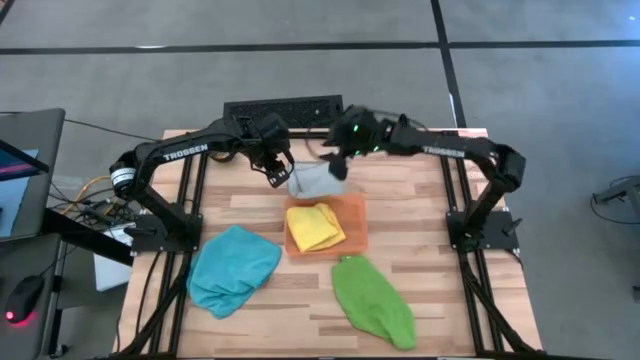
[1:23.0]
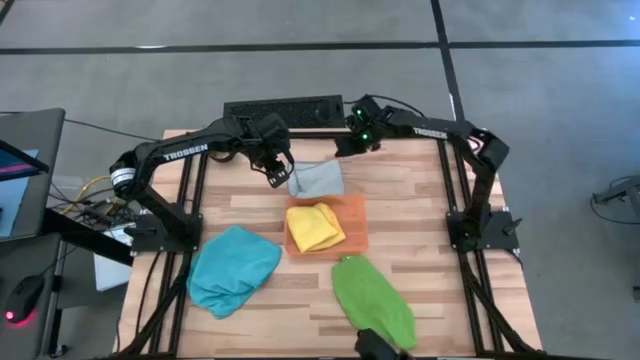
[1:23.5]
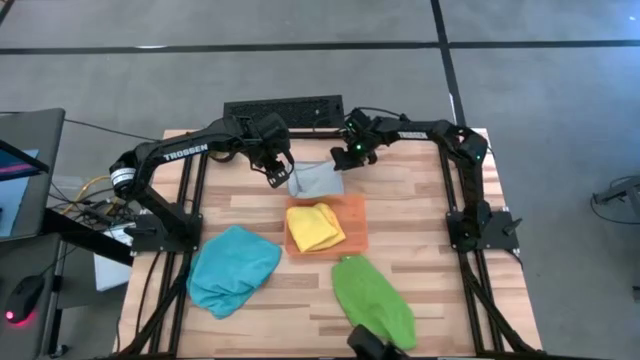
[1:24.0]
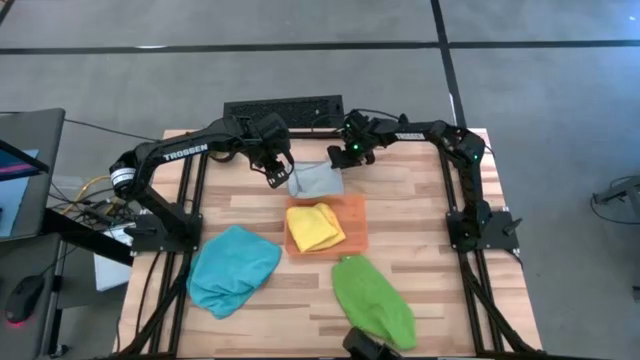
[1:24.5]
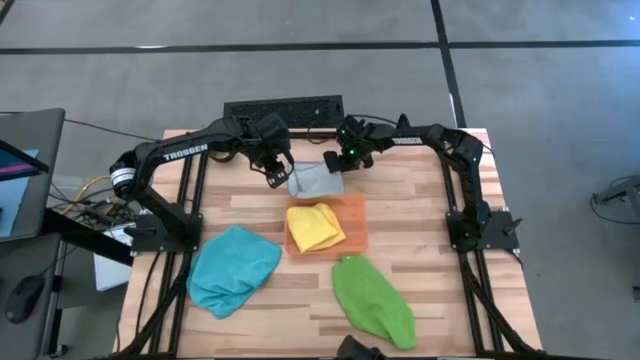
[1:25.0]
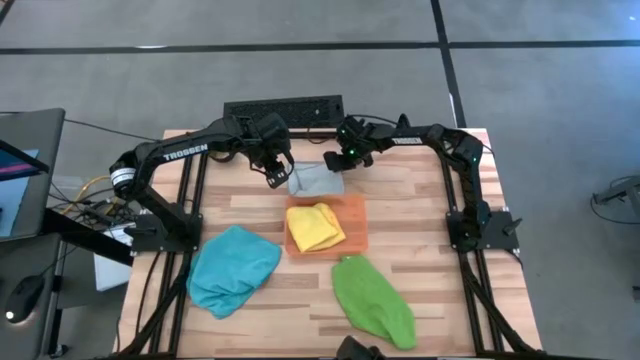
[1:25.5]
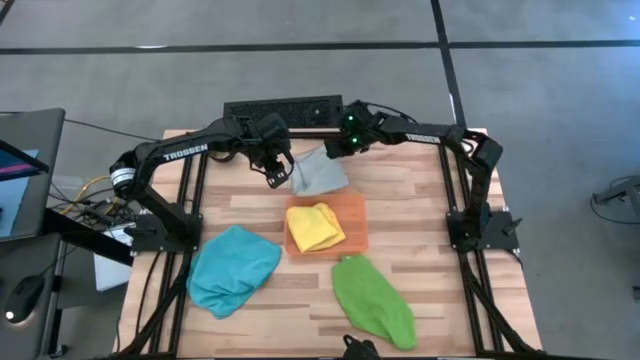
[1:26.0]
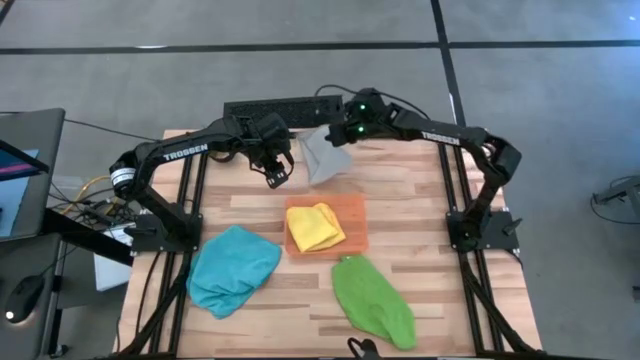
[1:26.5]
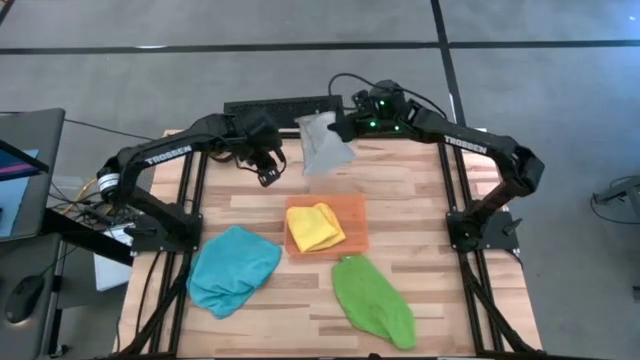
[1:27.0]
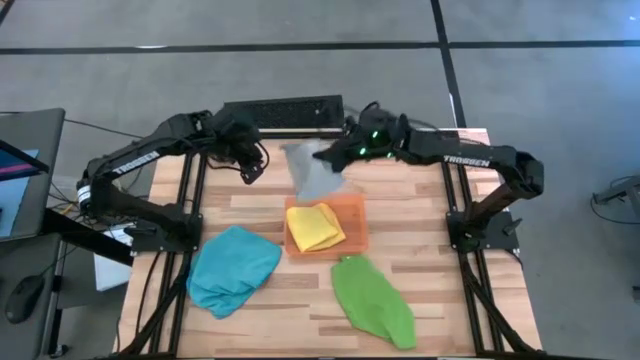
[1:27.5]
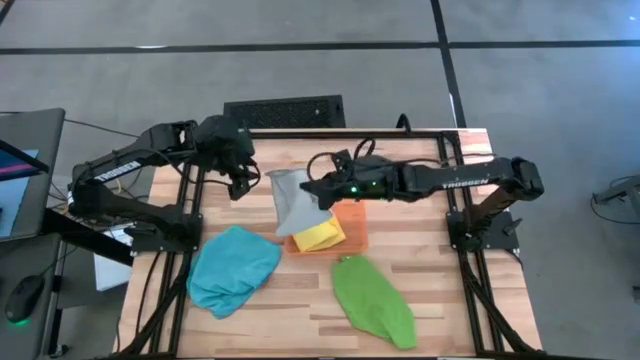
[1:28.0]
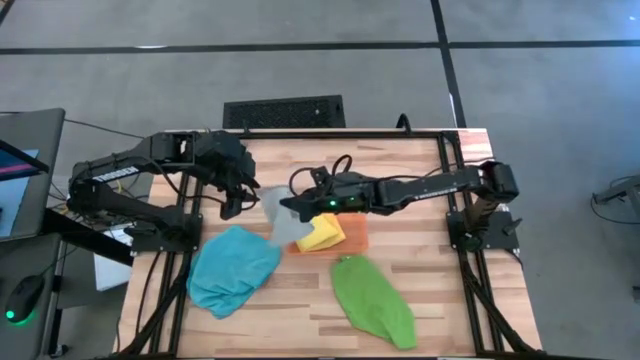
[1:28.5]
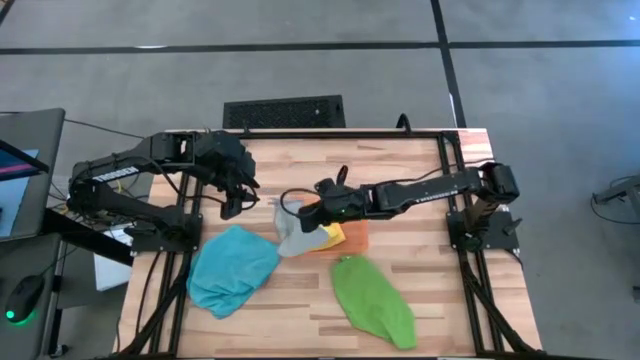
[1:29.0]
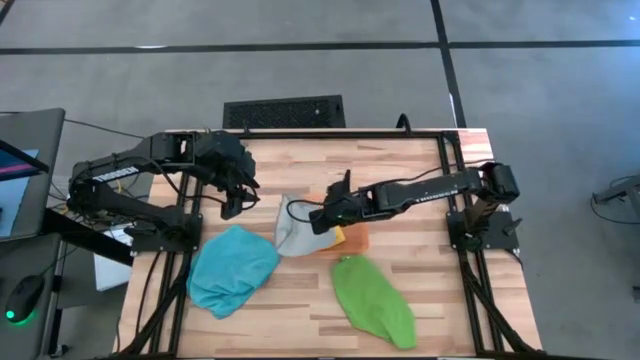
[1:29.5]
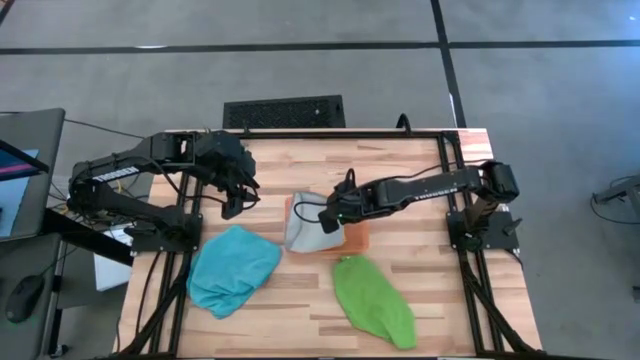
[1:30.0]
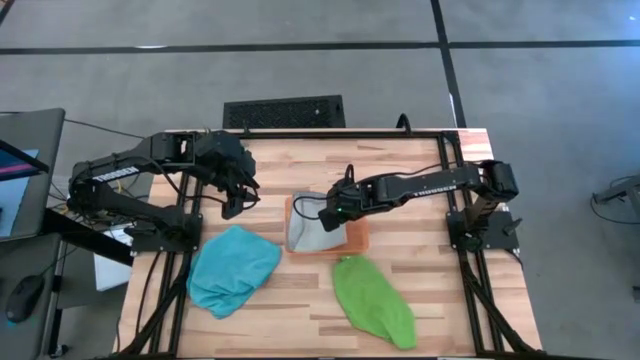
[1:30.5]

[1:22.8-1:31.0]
Task: Sort microfiber towel by color & place in baskets
Stack the gray towel on top of the yellow towel into the orange bin

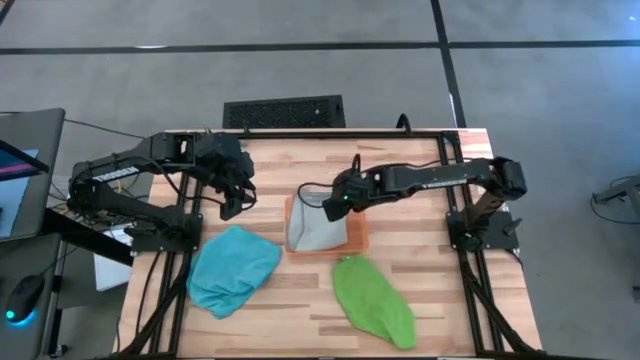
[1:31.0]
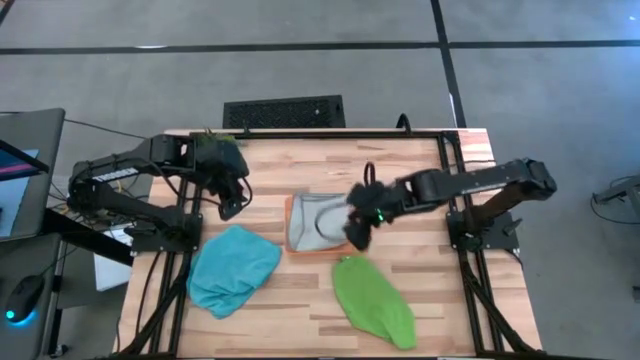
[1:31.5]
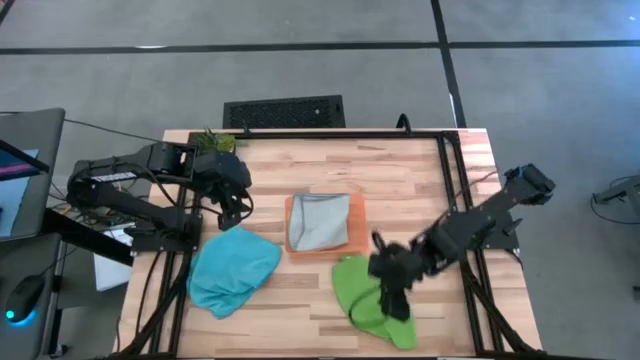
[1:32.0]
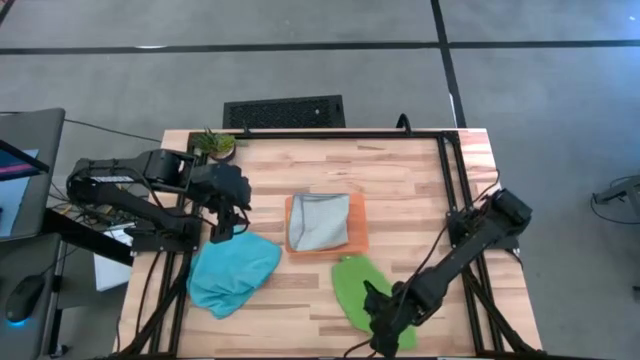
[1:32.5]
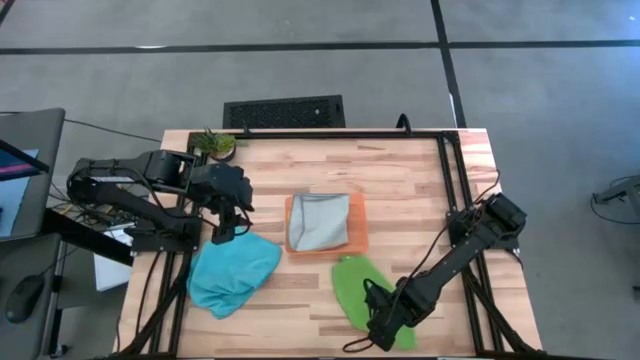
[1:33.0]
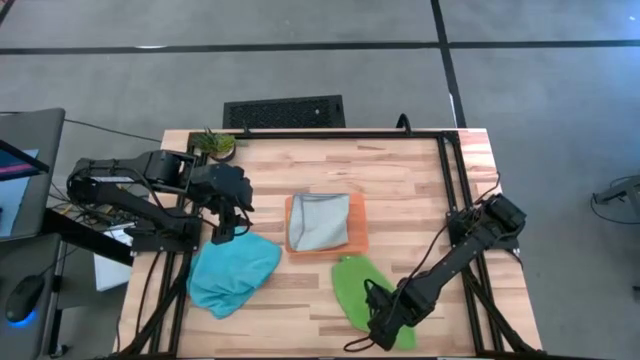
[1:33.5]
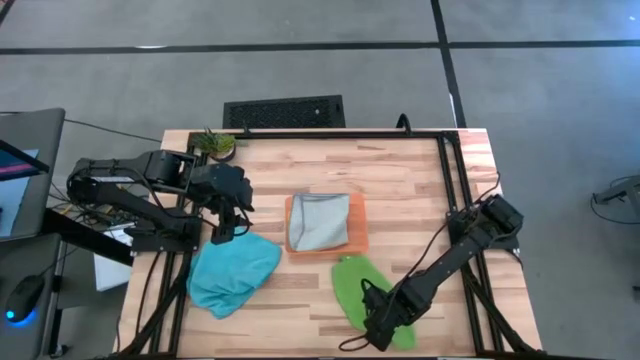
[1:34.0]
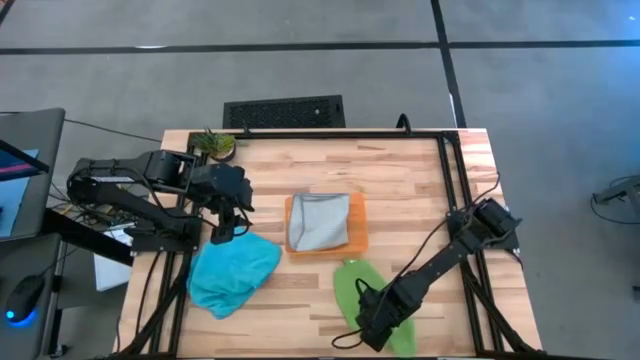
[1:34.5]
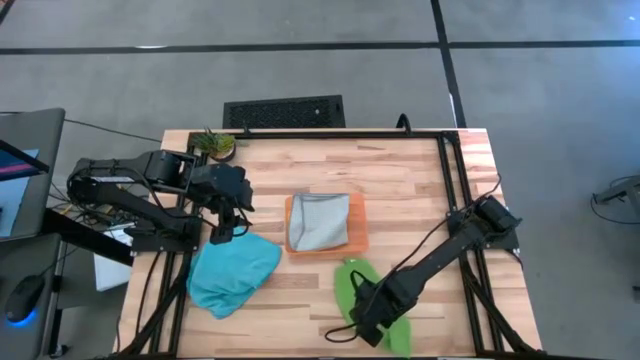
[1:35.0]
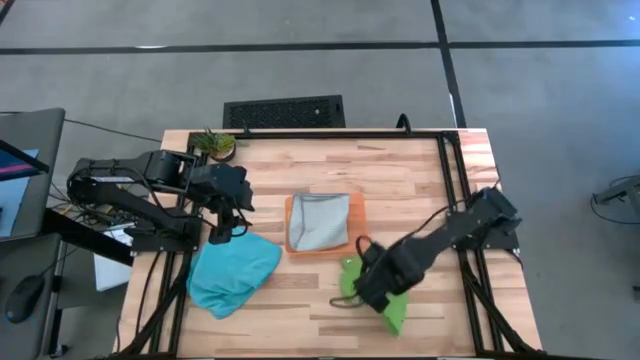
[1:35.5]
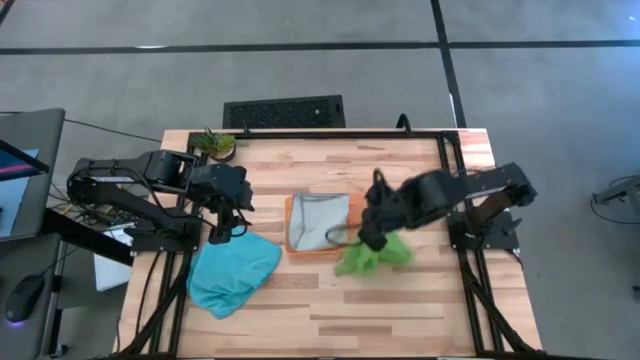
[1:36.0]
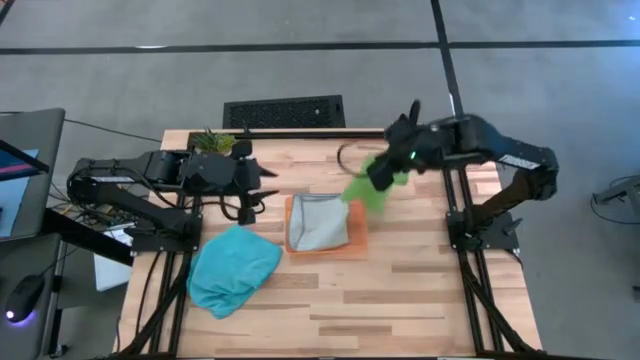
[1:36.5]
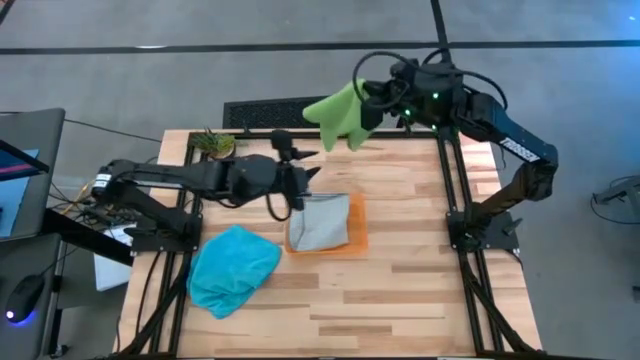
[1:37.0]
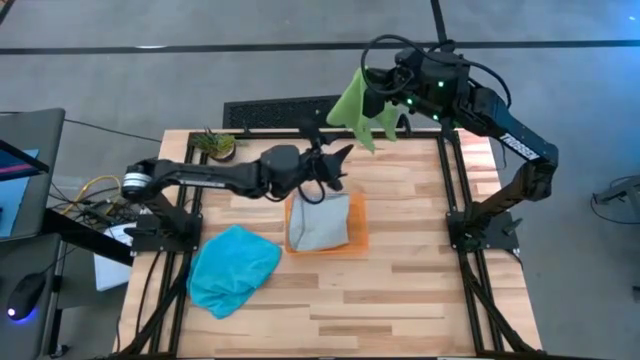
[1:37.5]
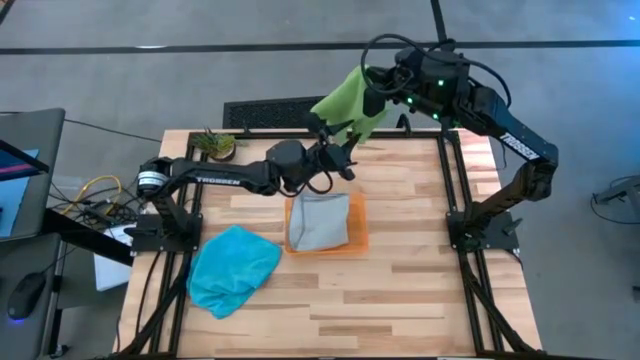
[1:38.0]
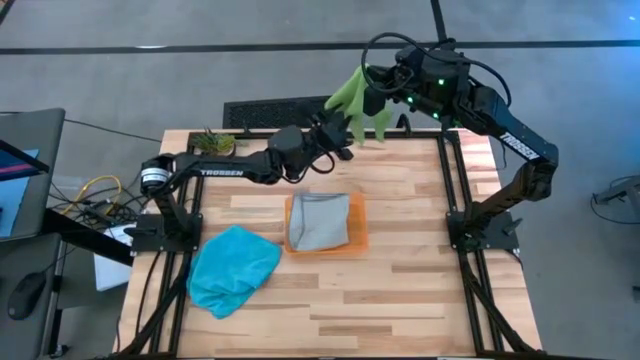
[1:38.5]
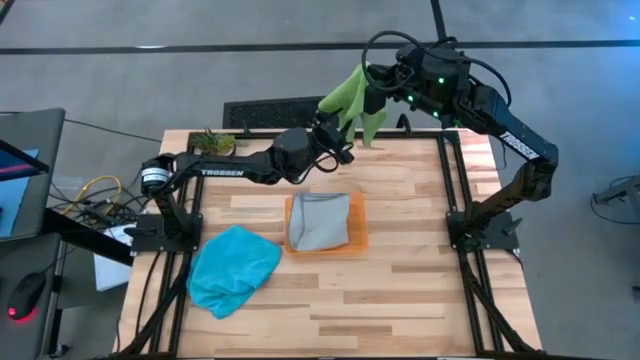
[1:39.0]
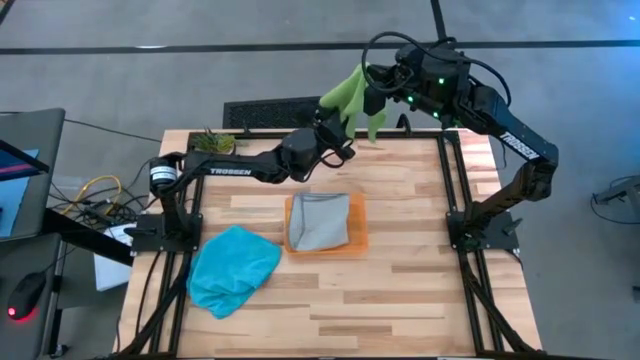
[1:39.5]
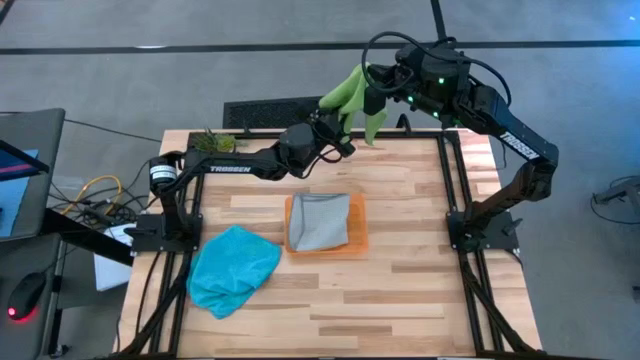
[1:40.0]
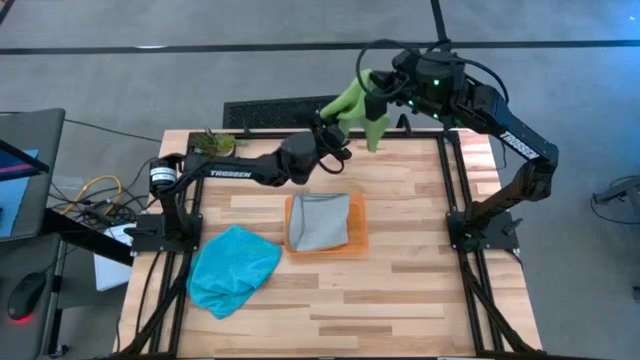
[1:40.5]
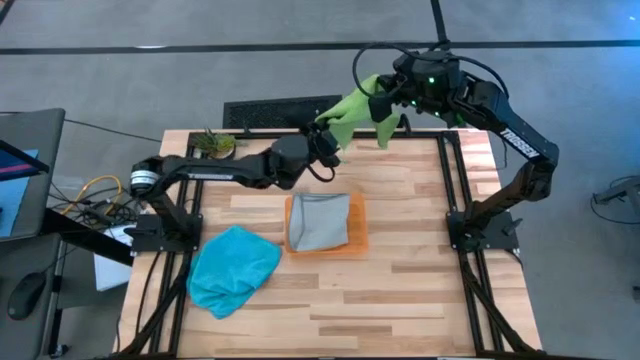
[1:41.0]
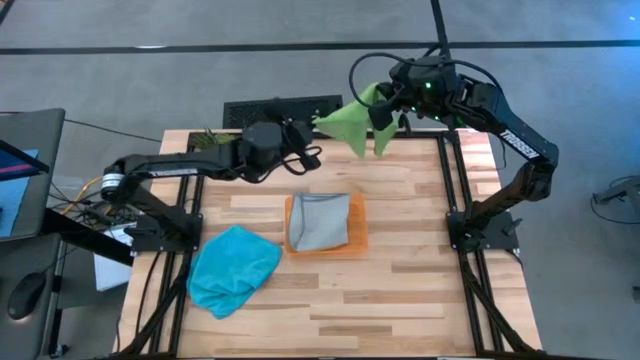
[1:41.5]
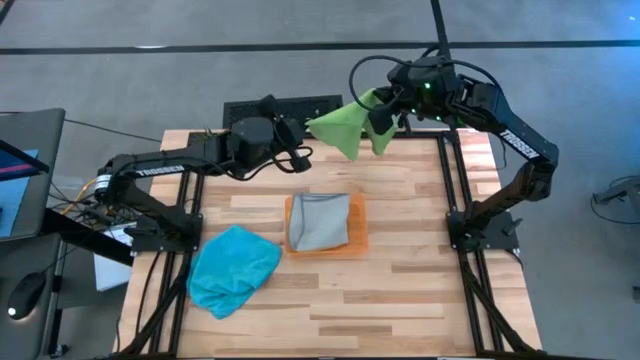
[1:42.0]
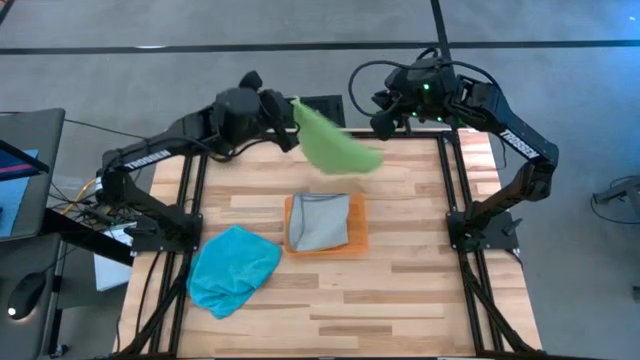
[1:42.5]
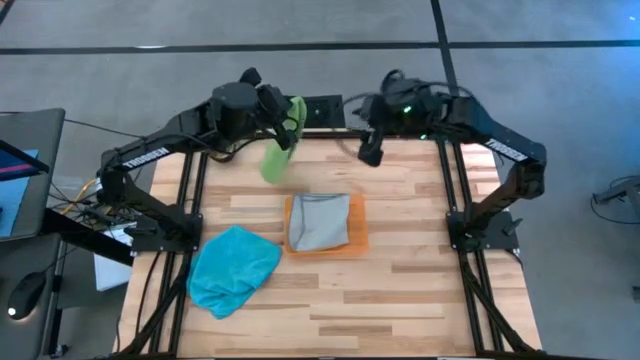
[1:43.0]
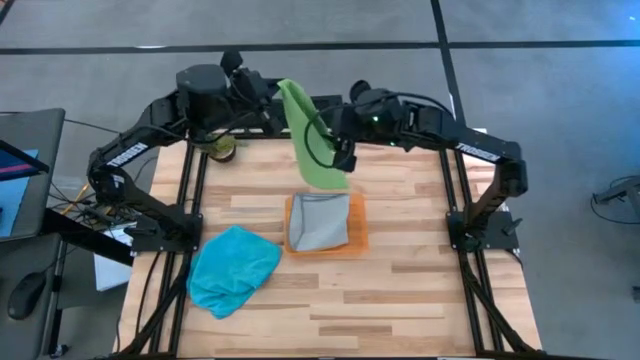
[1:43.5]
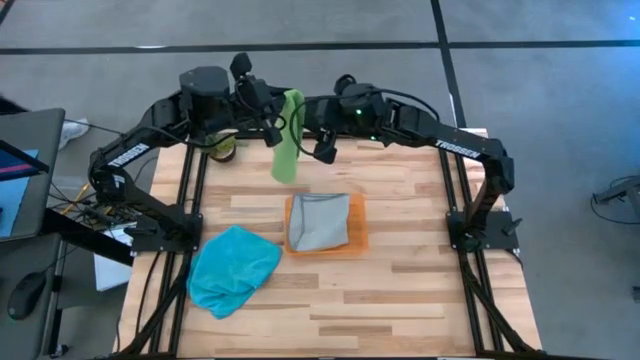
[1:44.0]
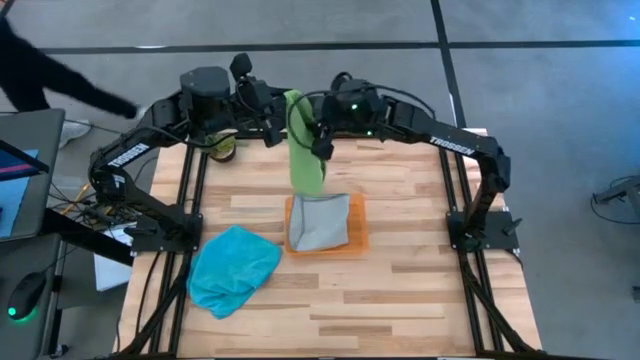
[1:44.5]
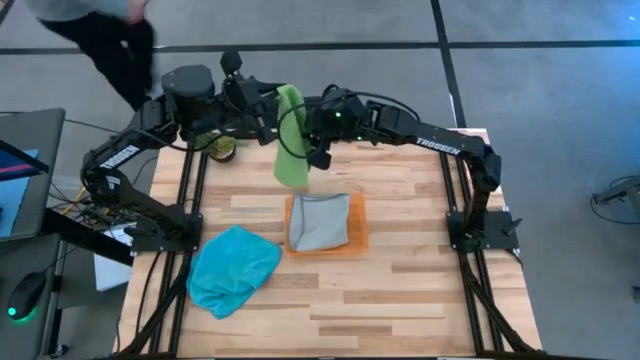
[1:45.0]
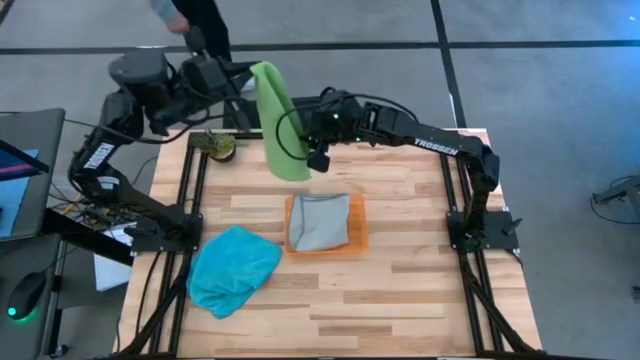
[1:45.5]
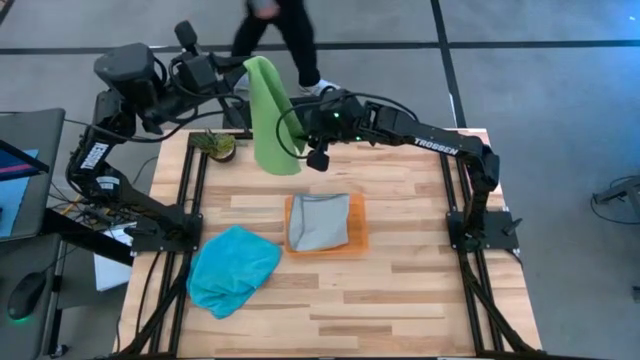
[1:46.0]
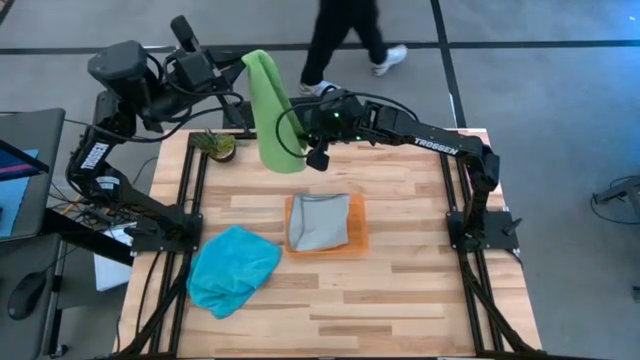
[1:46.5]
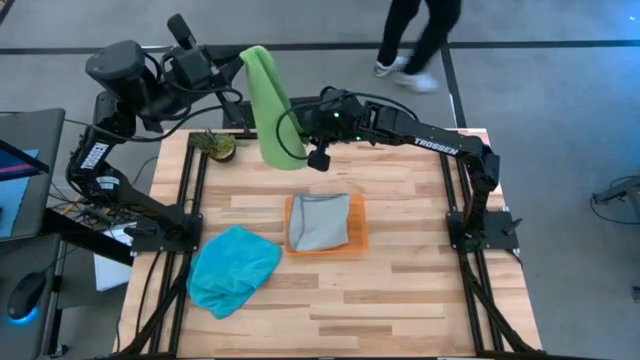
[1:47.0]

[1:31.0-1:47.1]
Fold the green towel
